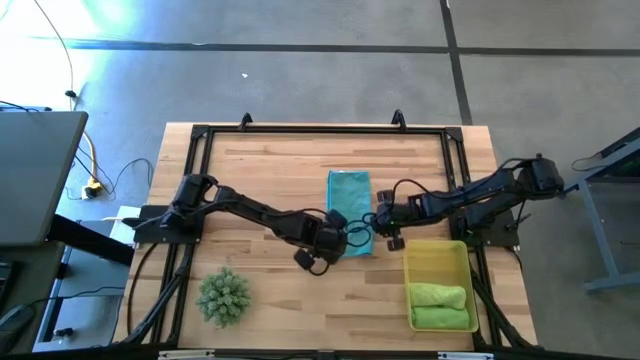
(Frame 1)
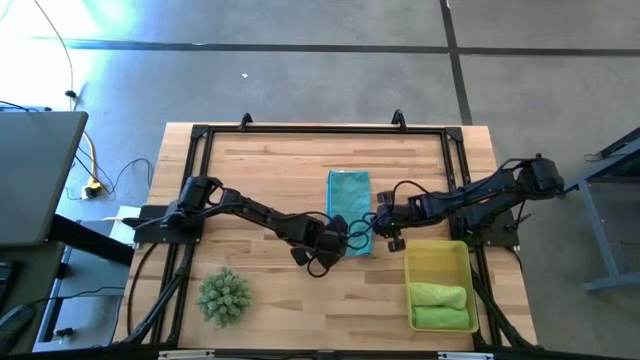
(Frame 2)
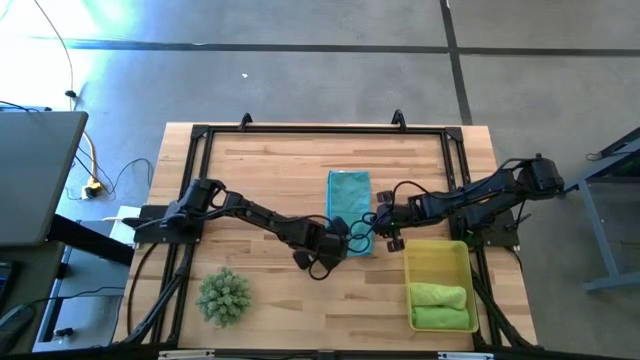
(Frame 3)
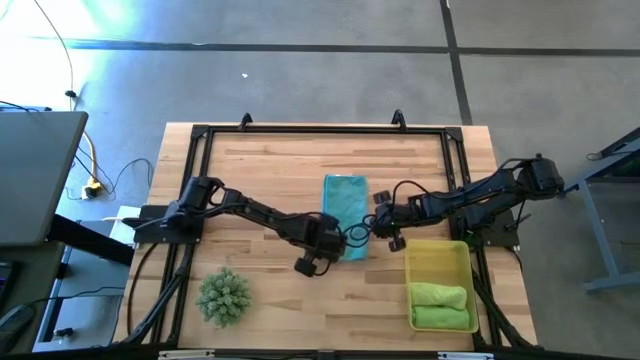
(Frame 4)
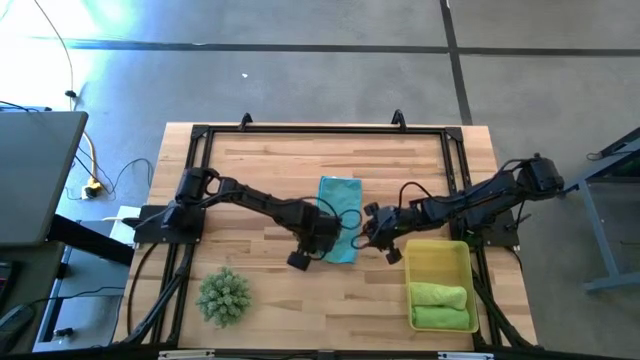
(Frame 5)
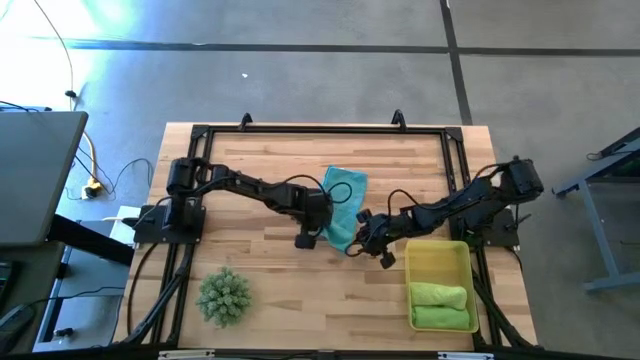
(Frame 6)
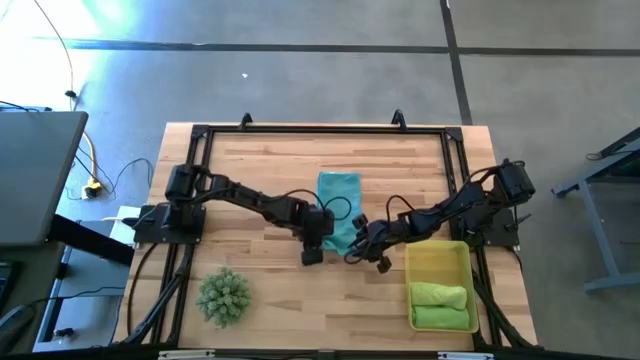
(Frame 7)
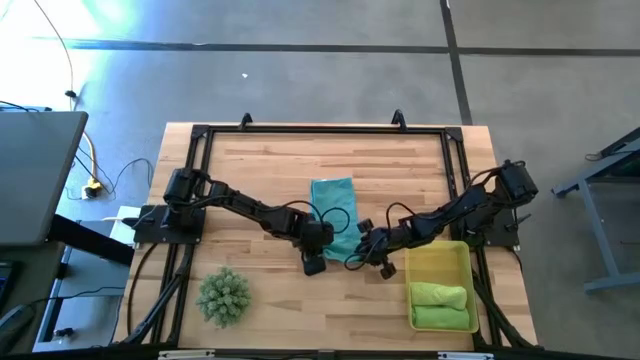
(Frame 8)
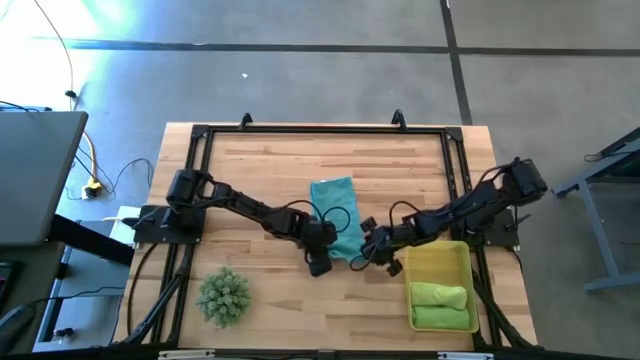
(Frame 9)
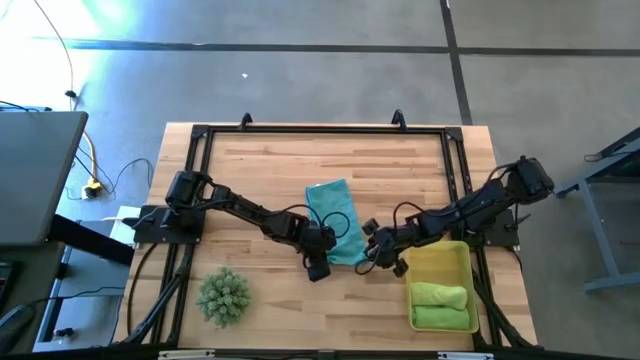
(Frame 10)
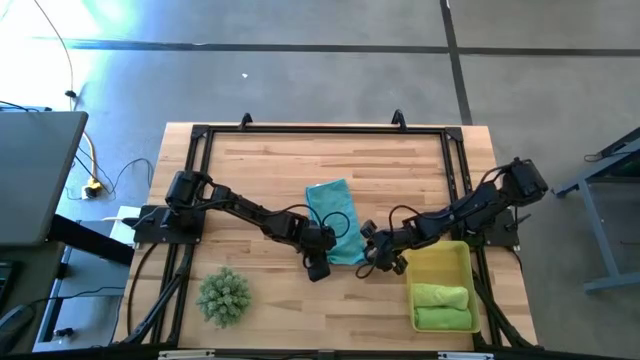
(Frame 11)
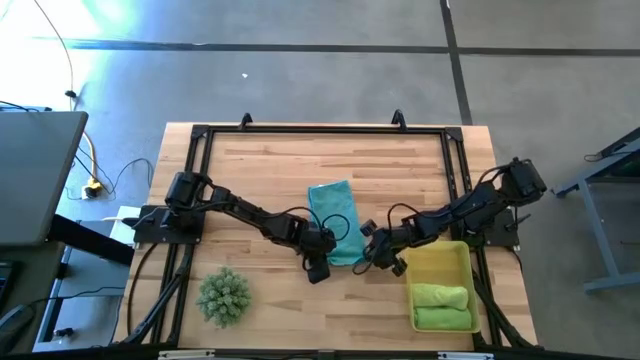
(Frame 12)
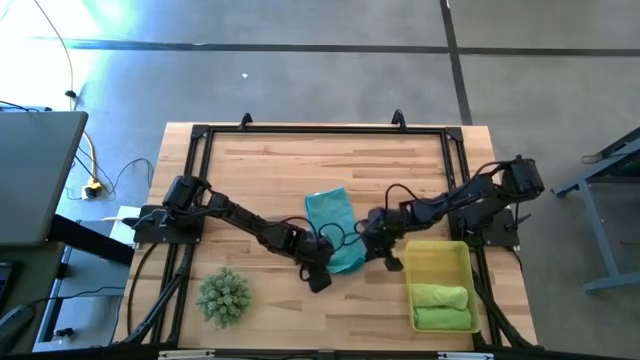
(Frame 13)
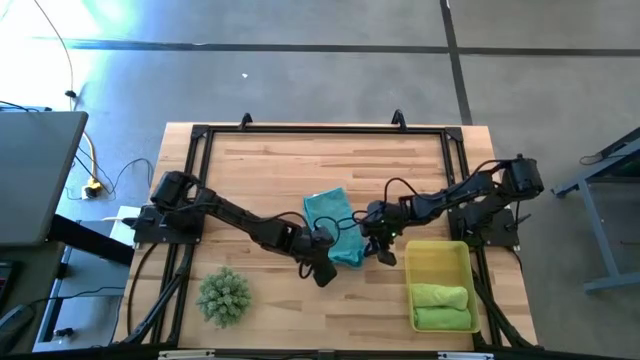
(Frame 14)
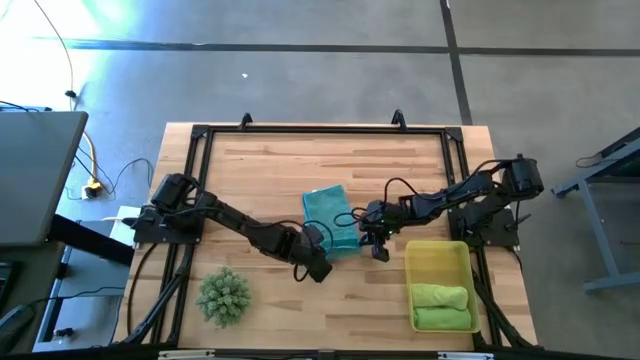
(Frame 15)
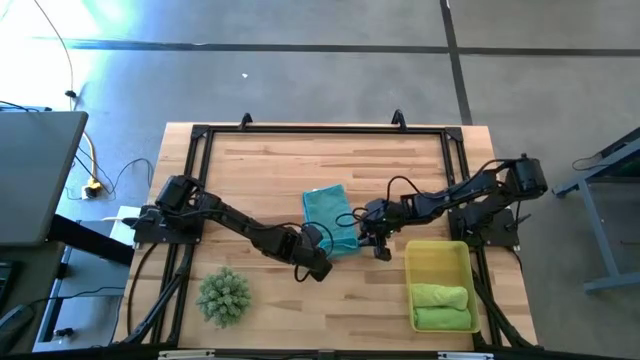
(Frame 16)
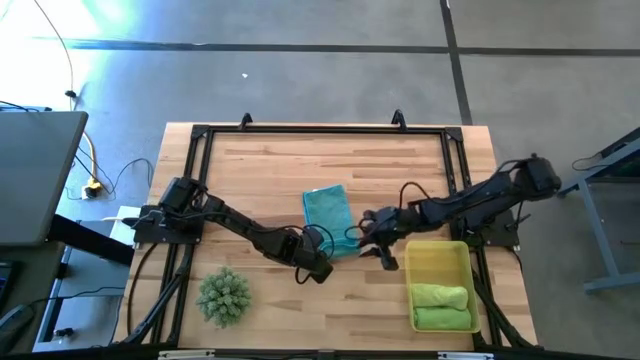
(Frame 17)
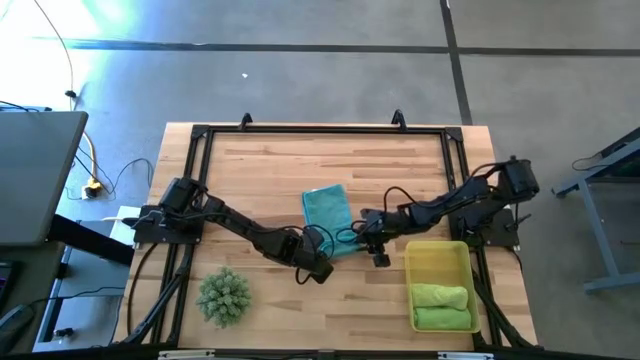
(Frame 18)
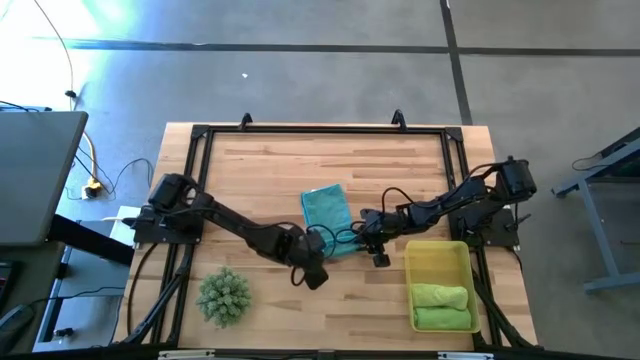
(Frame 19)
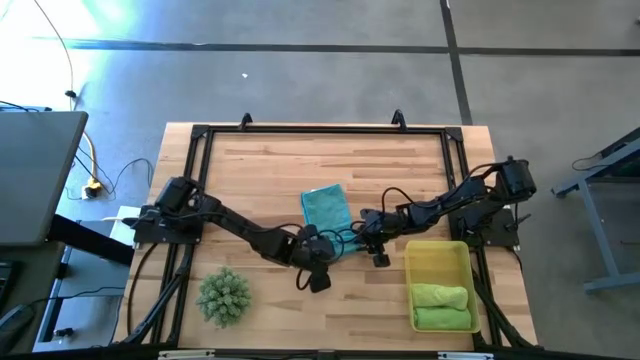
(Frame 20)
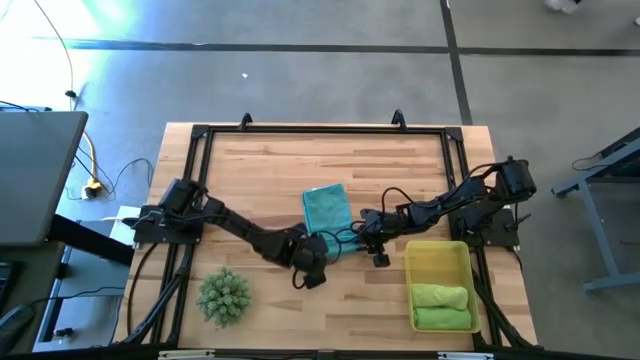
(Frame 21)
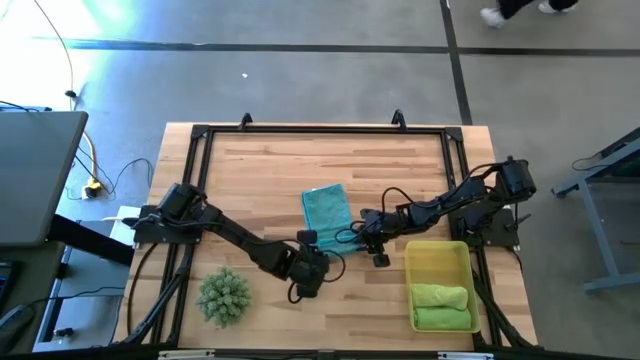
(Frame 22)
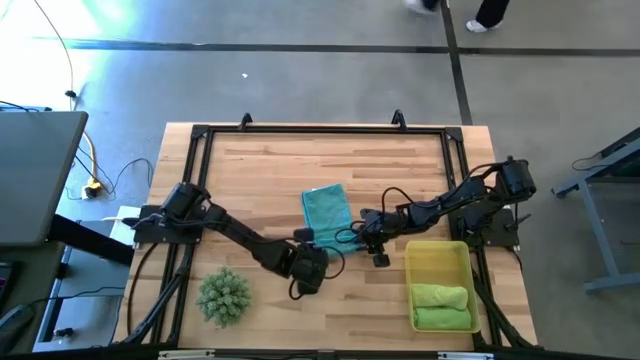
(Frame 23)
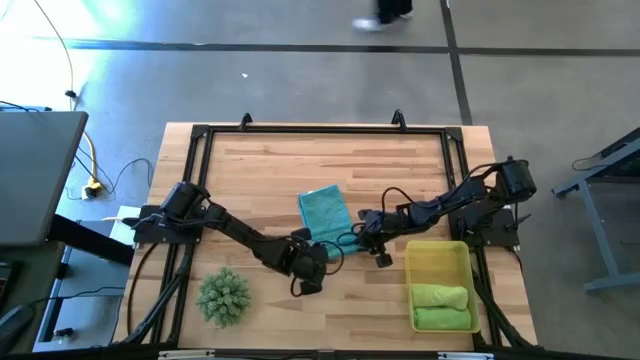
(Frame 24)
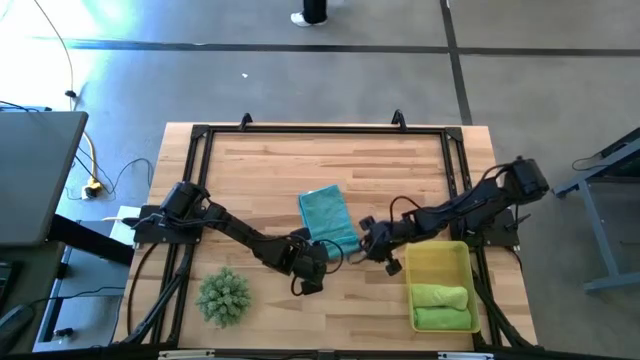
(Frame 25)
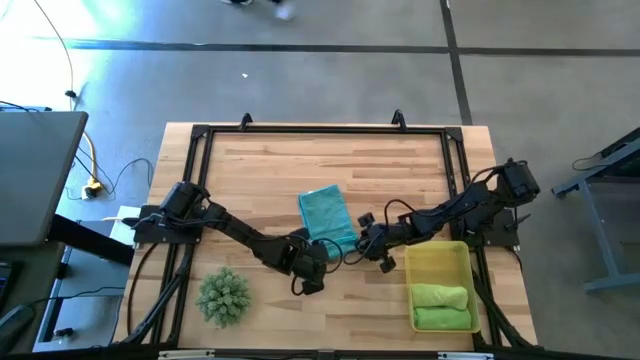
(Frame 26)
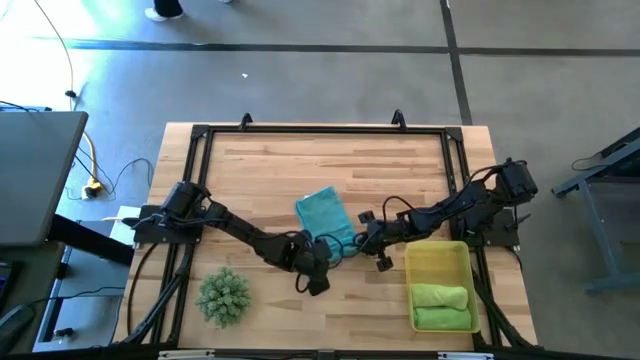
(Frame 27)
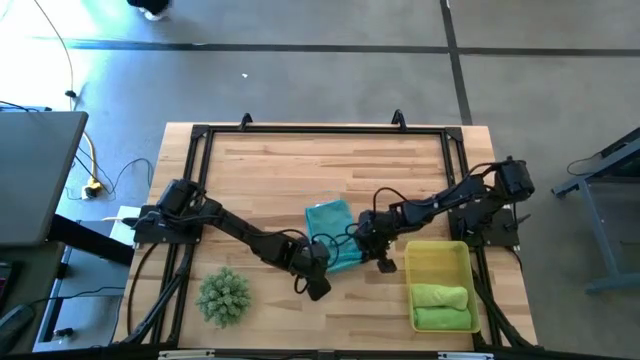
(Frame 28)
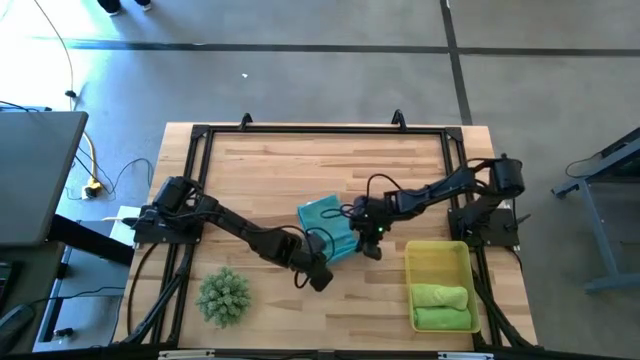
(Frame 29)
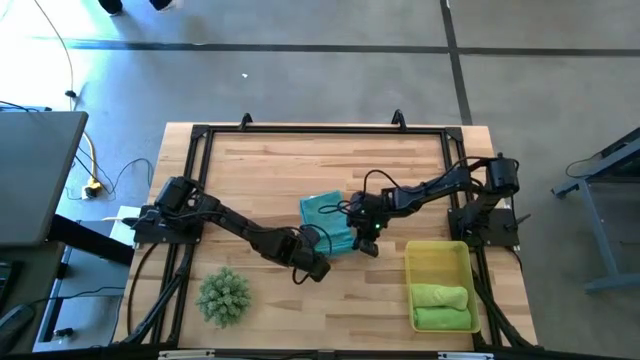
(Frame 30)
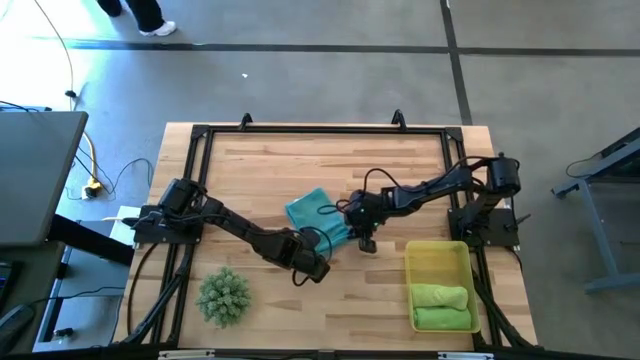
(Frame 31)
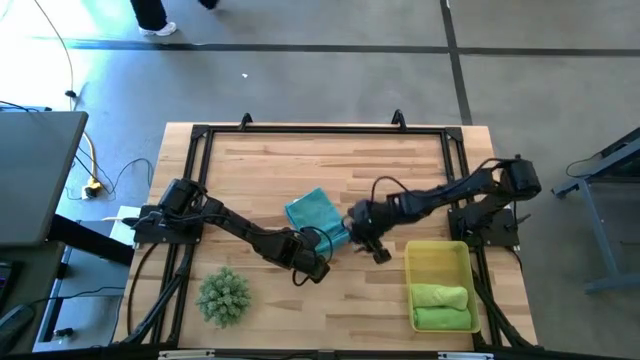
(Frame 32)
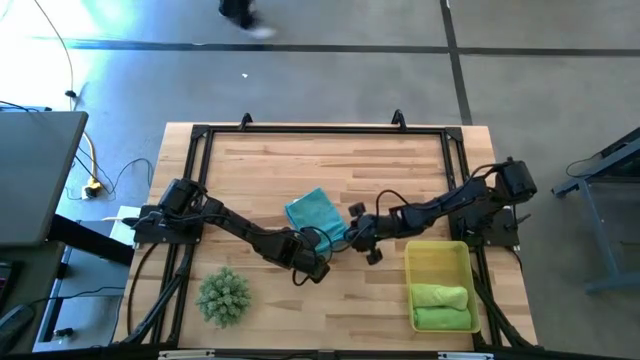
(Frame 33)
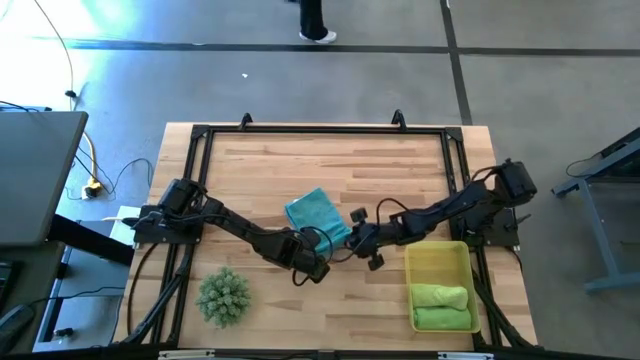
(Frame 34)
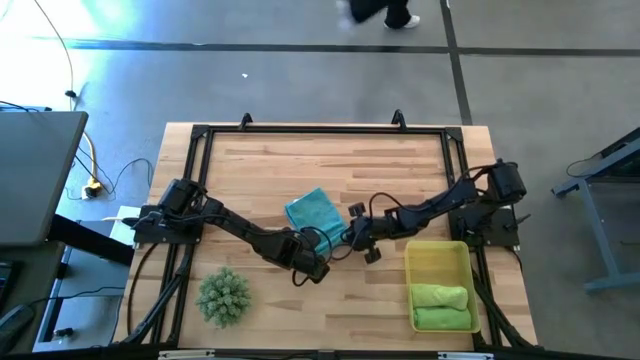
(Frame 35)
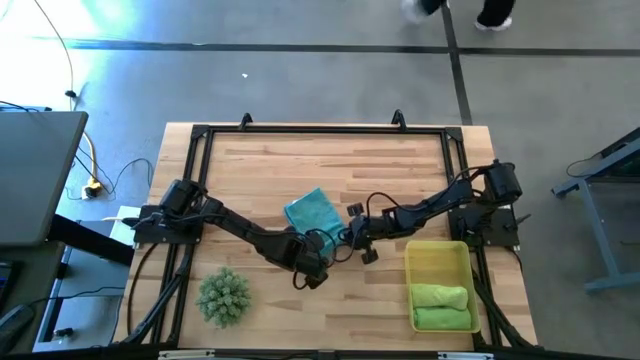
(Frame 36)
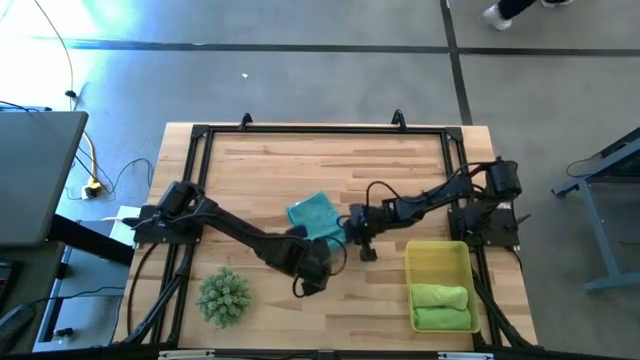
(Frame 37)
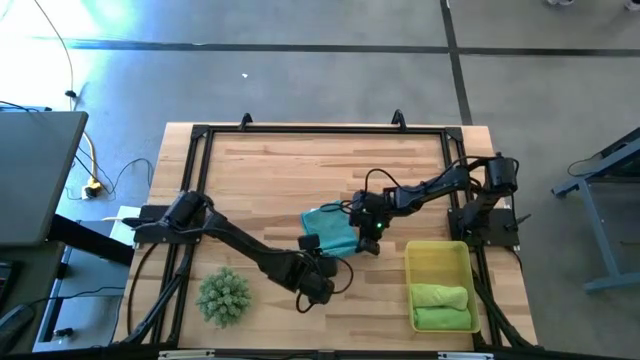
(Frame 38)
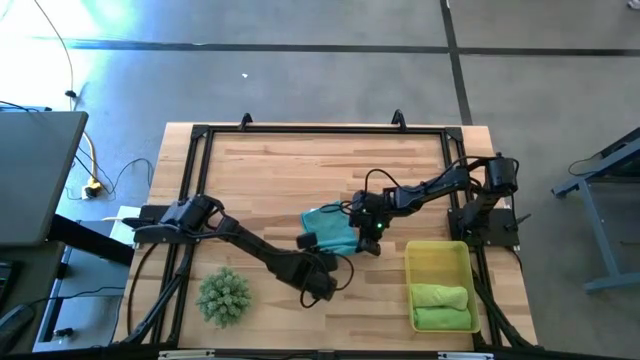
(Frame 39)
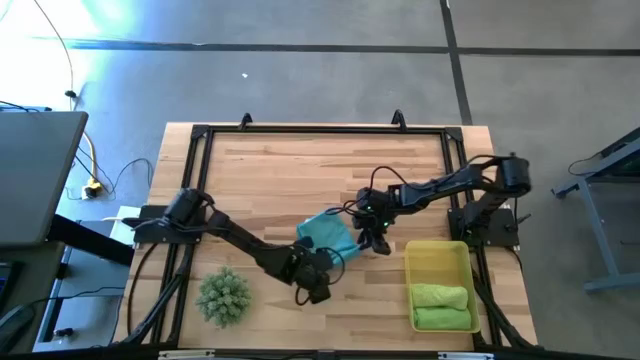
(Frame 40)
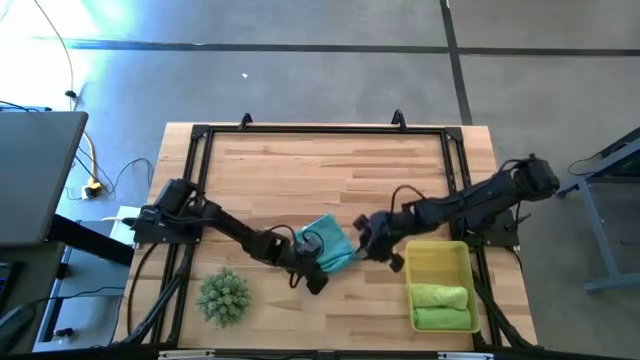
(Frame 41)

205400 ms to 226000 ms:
Task: Roll microfiber towels into tight, uniform cylinder then place into a basket
Roll the blue microfiber cloth
